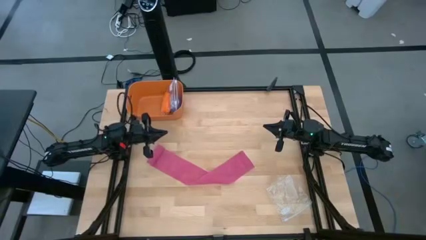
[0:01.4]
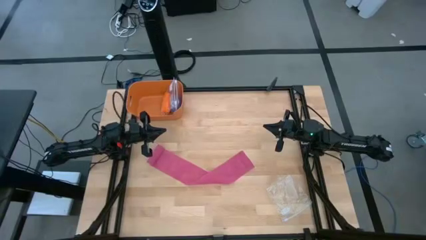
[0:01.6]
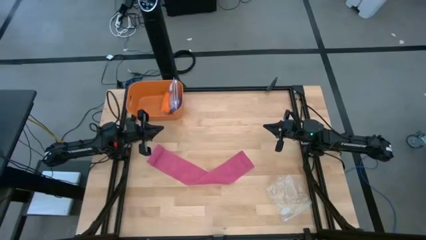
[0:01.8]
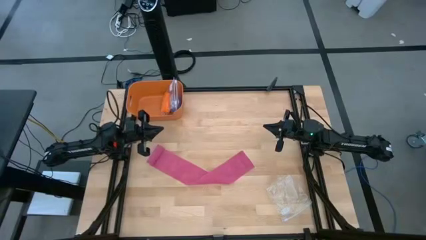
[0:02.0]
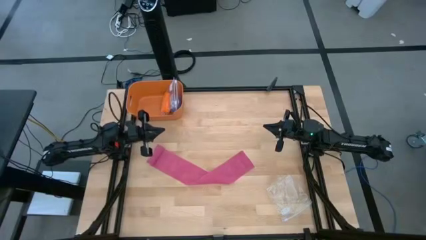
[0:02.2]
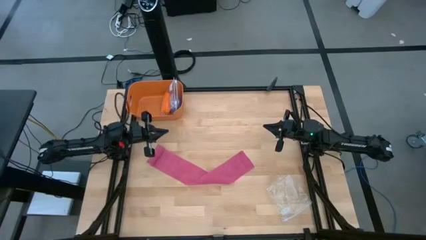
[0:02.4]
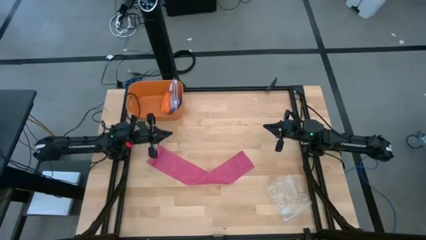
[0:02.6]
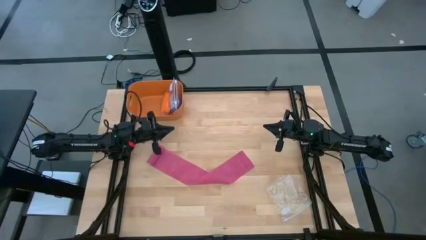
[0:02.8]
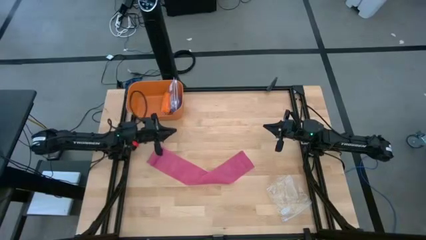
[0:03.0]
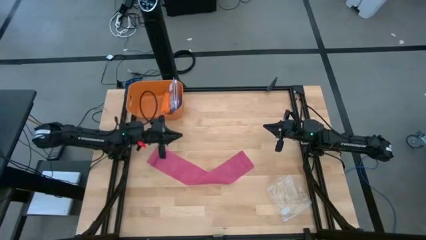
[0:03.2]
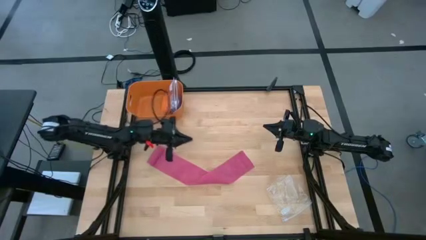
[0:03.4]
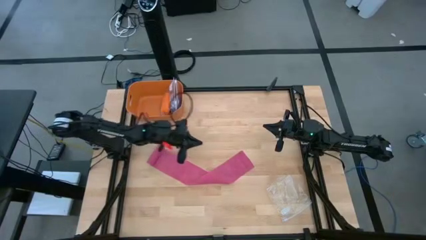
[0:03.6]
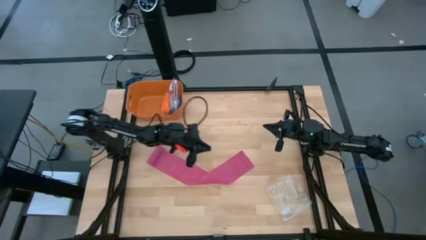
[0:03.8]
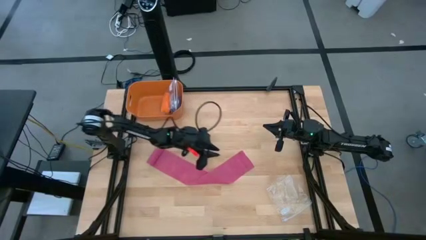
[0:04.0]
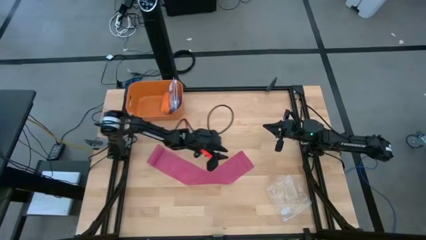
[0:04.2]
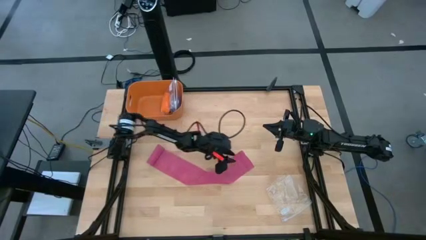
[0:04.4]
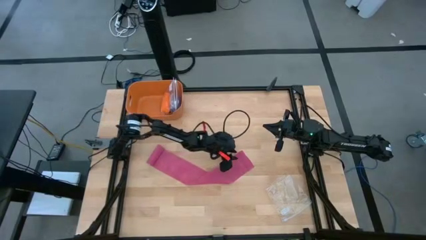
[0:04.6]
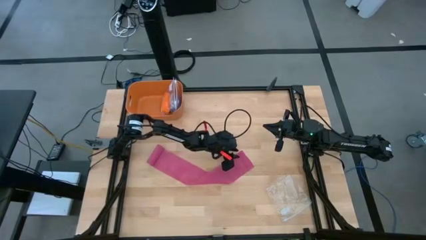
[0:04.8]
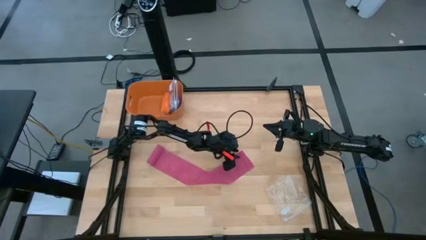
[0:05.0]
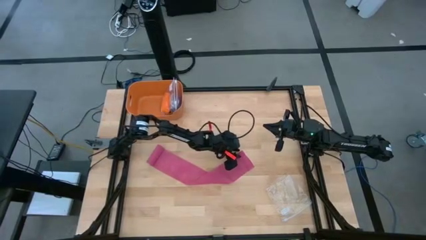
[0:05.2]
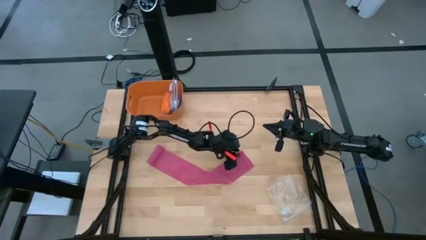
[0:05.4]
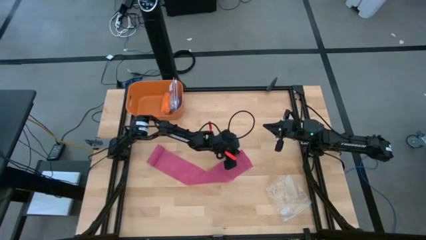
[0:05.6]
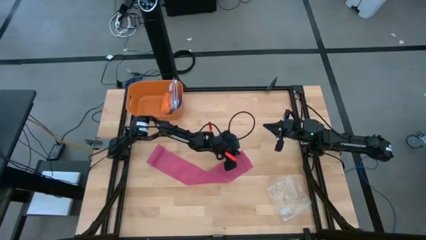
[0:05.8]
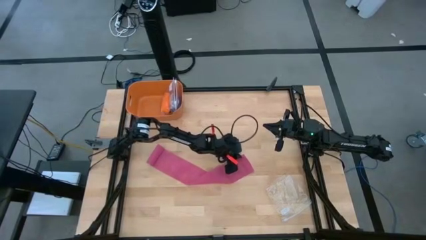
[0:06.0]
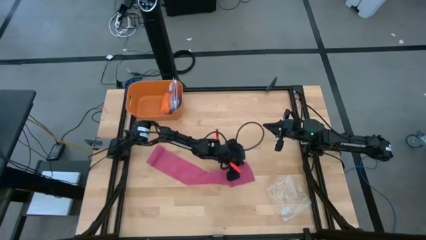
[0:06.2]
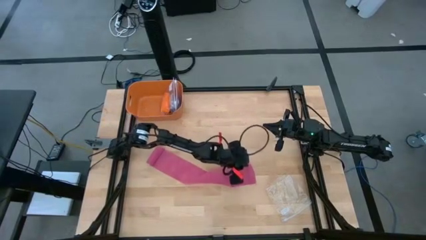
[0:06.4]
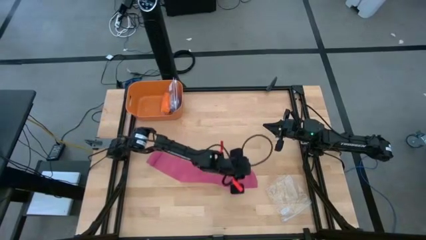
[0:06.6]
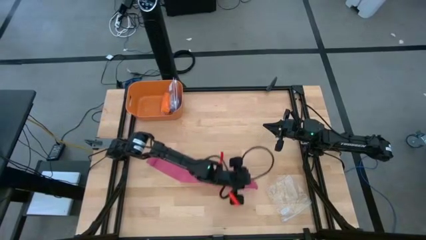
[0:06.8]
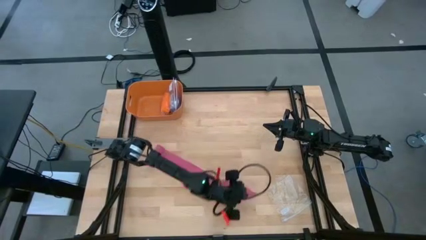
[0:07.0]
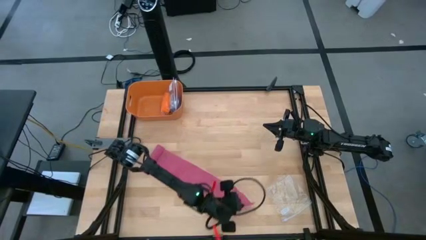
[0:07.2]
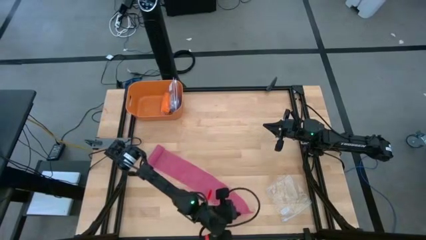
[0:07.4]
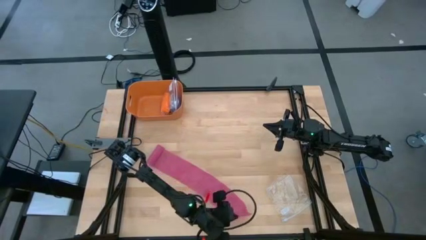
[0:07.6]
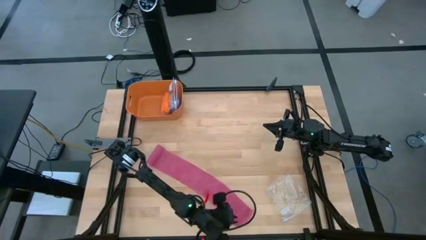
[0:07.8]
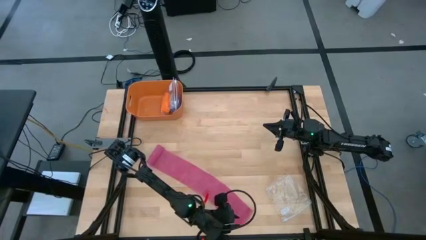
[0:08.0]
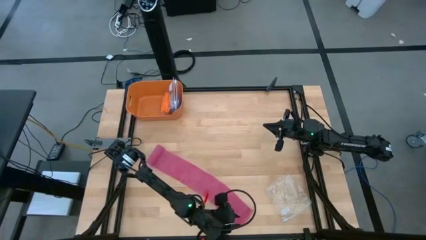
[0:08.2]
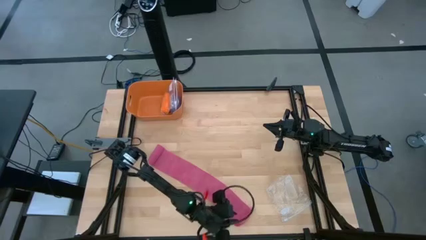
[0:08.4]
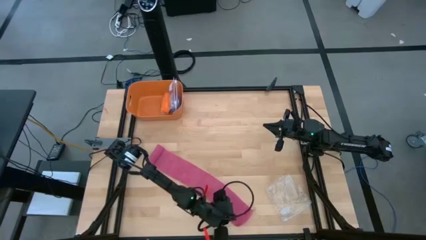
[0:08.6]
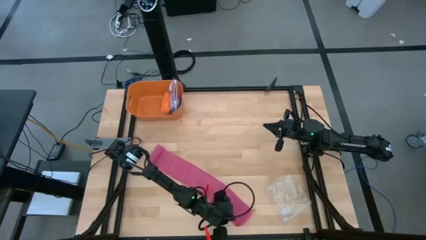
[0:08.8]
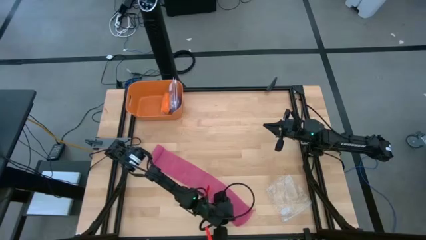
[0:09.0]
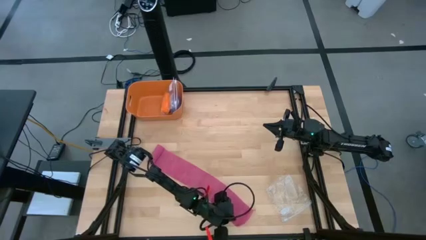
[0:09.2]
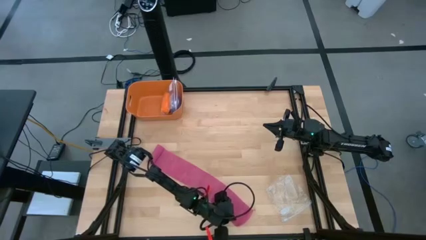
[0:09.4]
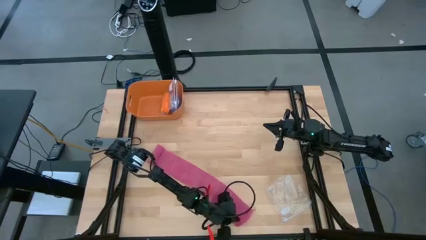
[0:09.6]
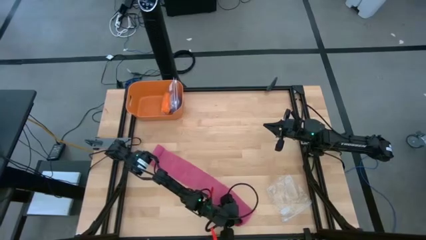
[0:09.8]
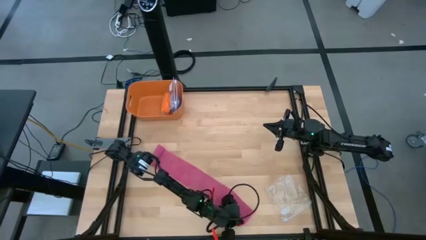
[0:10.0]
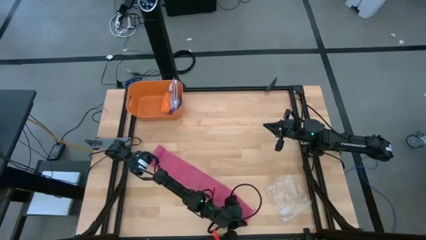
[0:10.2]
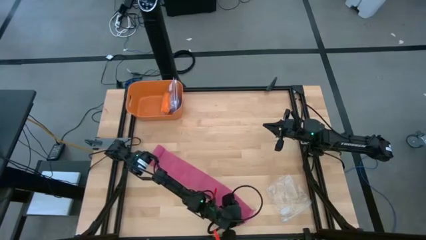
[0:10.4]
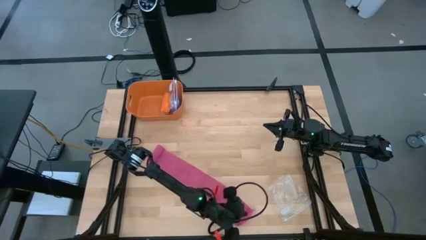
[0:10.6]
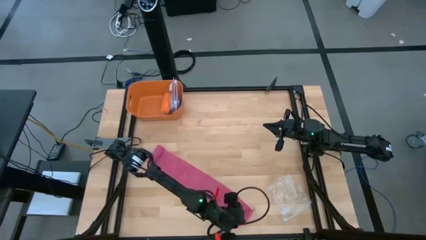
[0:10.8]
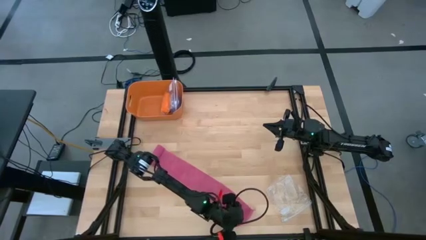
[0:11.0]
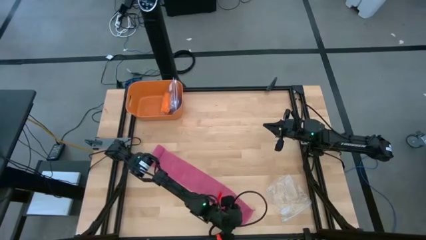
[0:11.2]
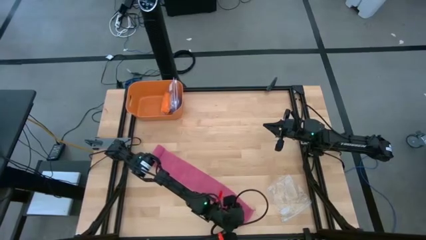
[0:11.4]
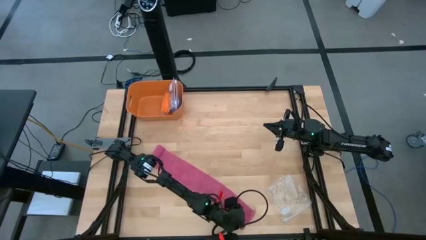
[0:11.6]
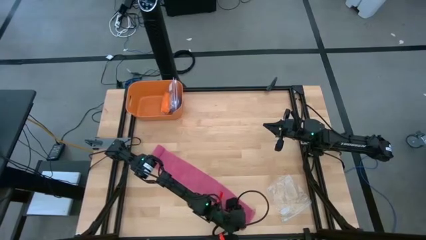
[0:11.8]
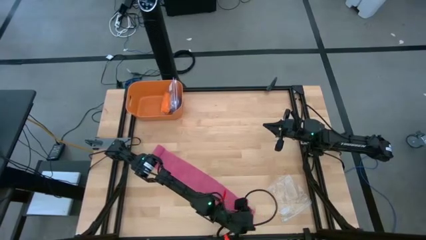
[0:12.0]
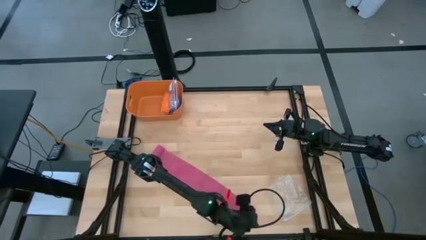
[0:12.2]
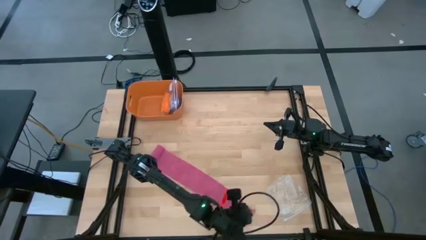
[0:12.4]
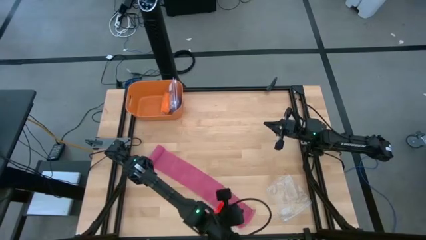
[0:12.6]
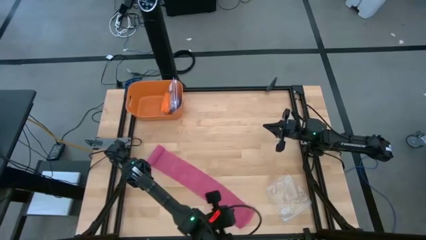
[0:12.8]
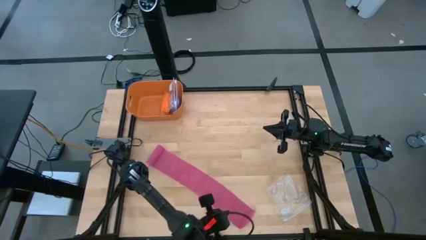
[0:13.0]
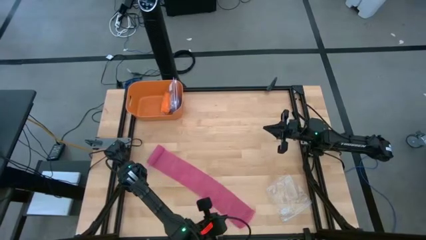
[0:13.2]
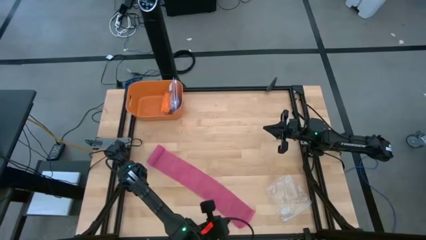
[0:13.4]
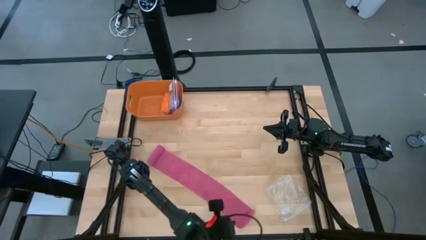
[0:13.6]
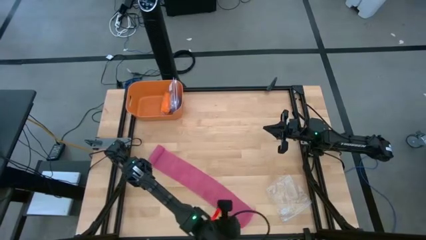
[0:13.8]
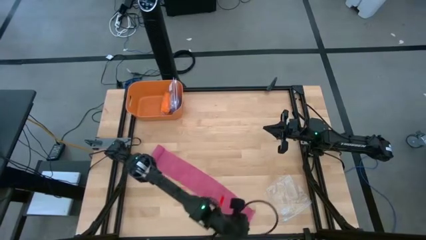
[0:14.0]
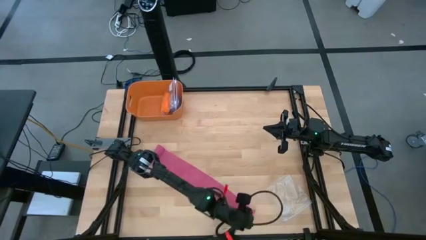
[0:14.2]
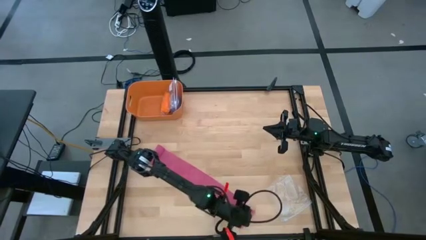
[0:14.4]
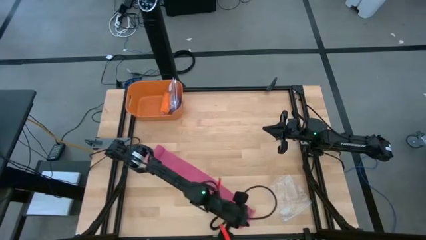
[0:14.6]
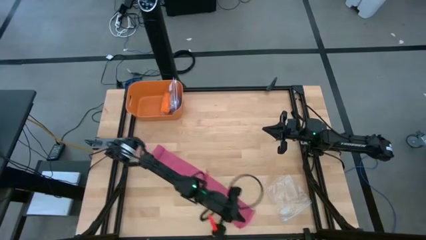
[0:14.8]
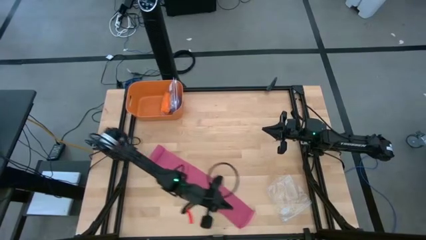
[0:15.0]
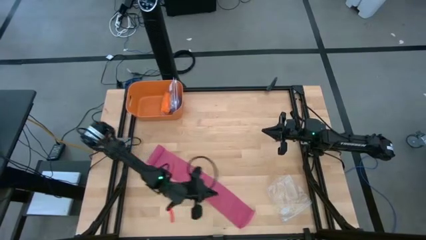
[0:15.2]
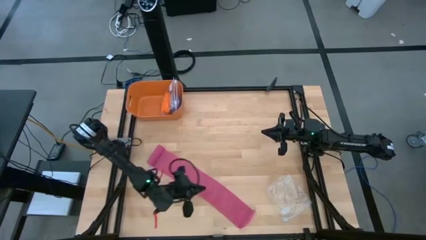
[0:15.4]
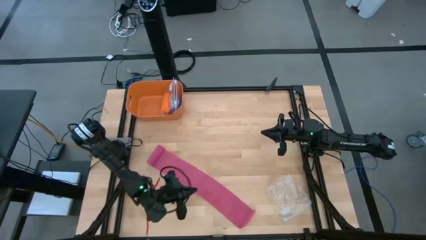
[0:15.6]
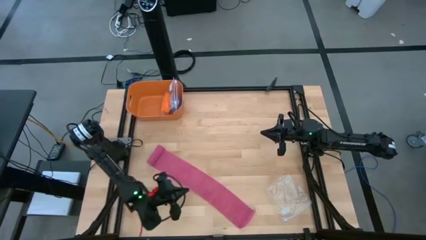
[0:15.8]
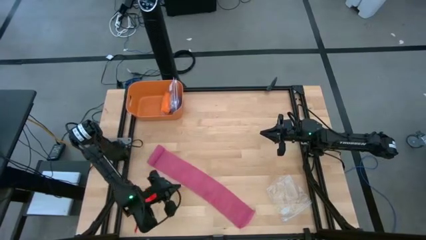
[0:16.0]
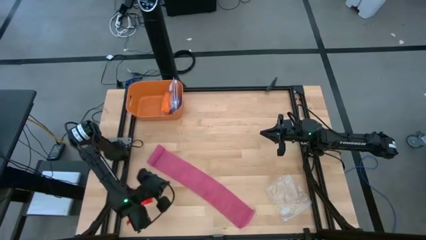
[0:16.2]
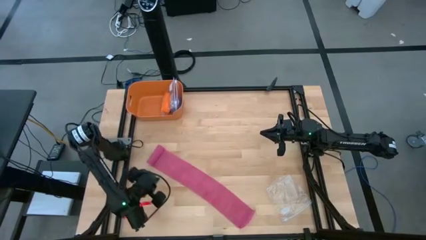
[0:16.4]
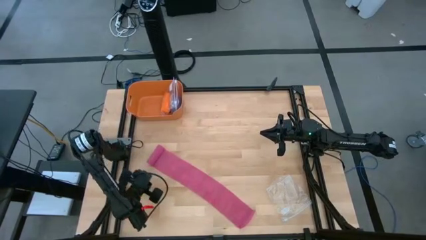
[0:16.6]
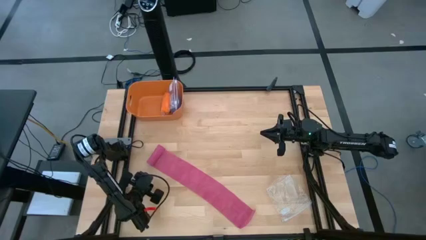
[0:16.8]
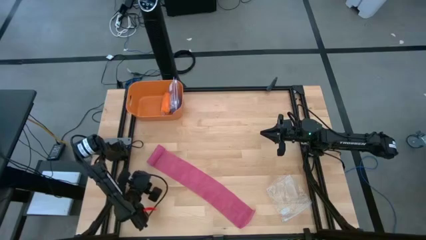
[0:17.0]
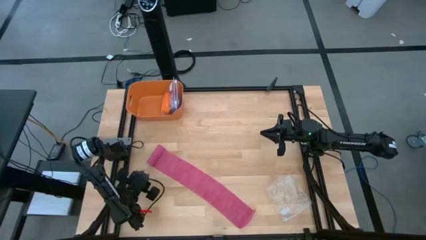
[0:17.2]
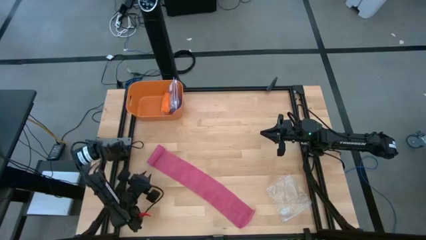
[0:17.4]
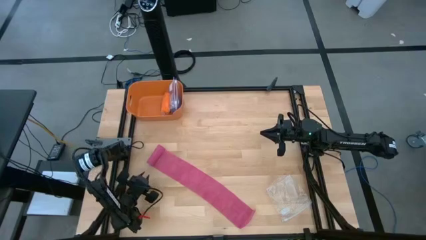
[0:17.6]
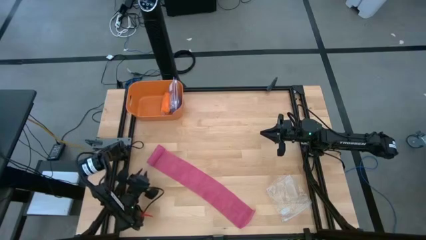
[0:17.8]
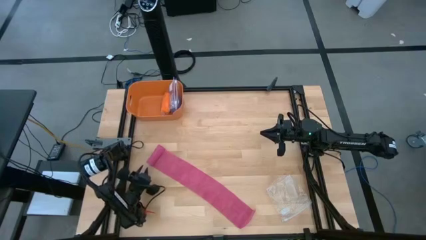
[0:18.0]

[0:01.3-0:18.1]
Task: Roll bandage
Roll the pink bandage
